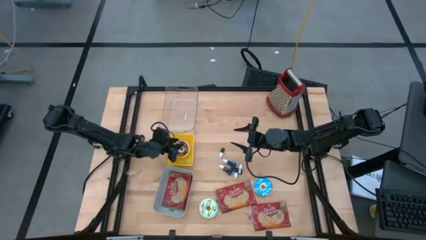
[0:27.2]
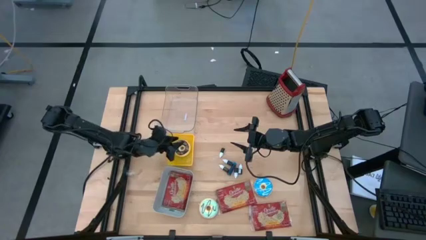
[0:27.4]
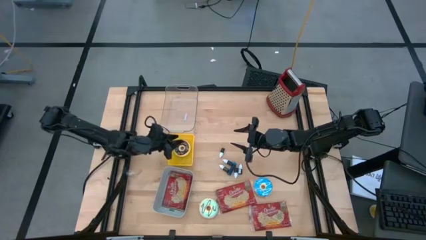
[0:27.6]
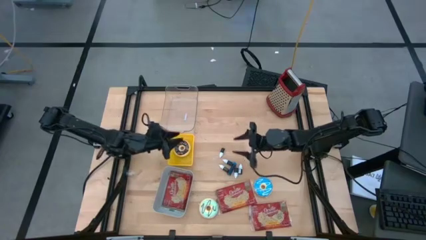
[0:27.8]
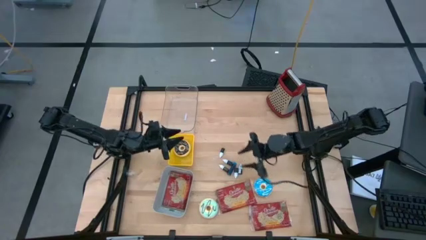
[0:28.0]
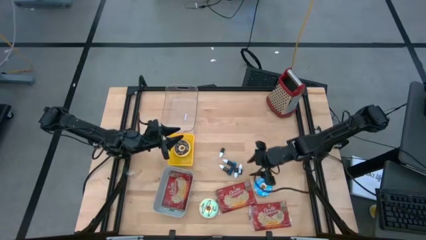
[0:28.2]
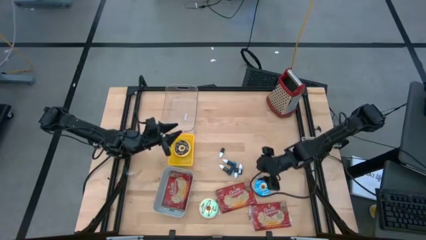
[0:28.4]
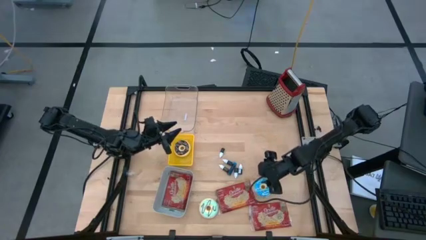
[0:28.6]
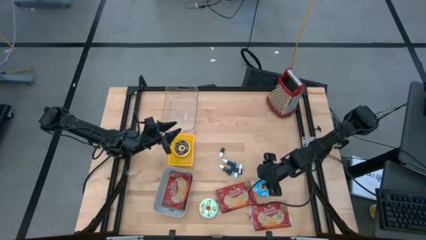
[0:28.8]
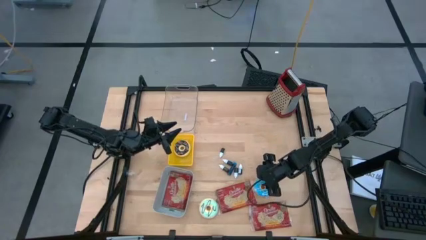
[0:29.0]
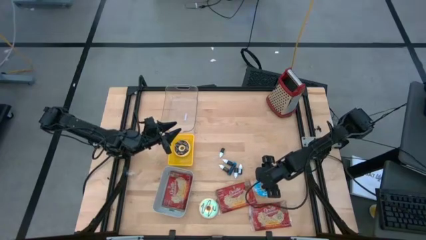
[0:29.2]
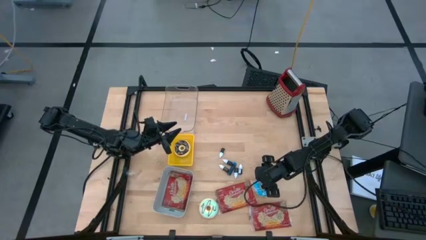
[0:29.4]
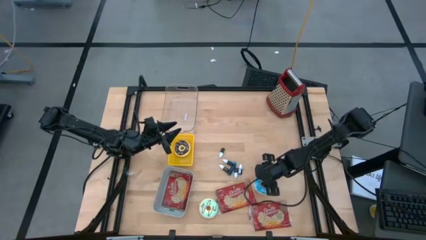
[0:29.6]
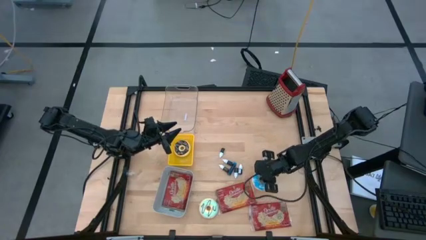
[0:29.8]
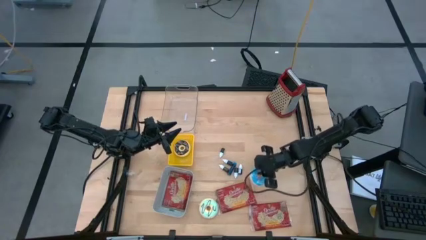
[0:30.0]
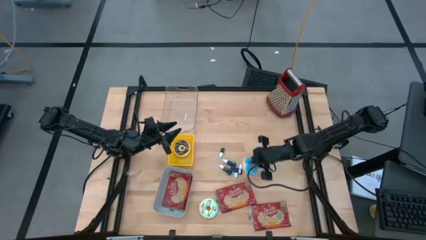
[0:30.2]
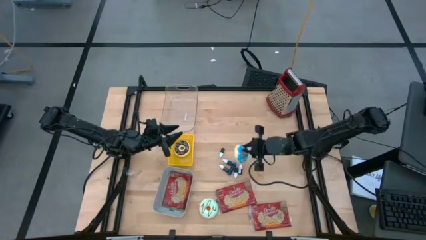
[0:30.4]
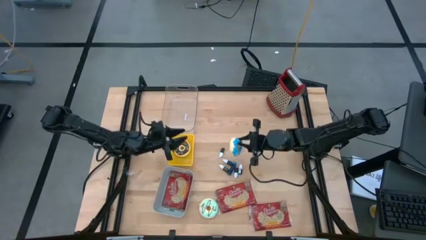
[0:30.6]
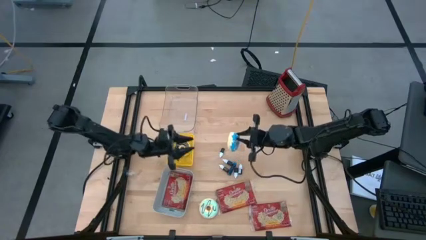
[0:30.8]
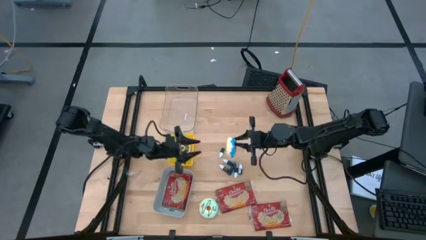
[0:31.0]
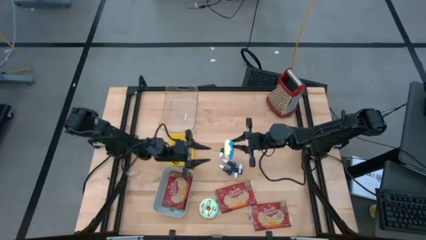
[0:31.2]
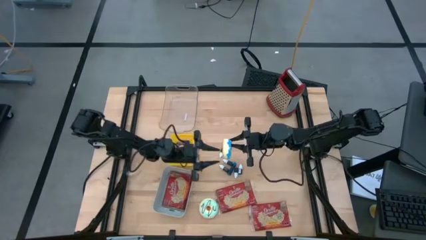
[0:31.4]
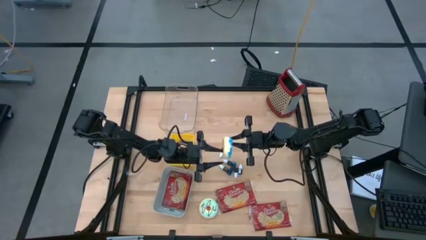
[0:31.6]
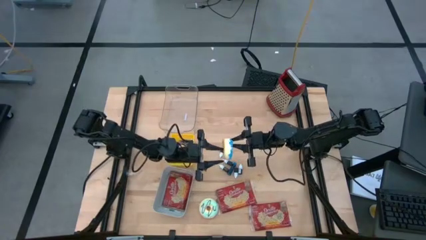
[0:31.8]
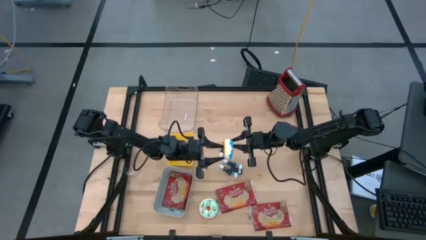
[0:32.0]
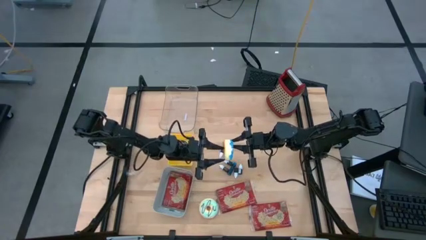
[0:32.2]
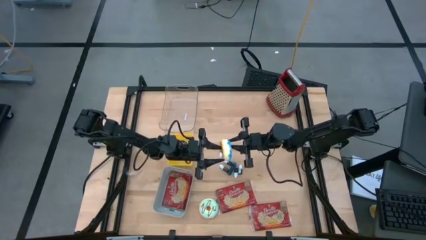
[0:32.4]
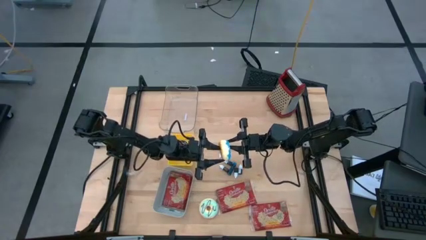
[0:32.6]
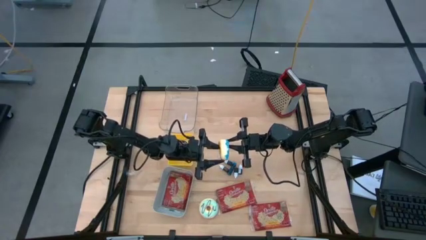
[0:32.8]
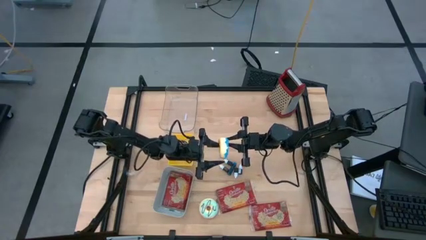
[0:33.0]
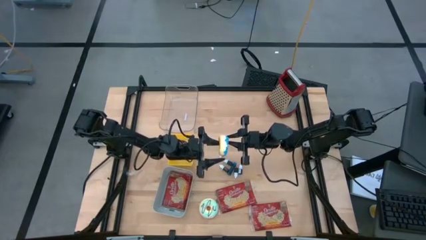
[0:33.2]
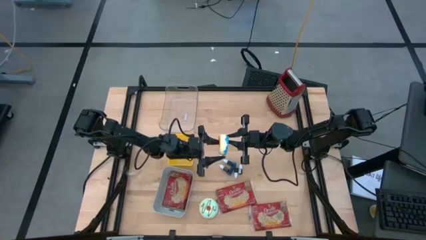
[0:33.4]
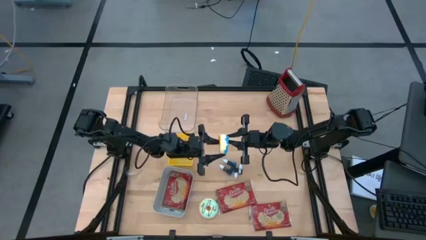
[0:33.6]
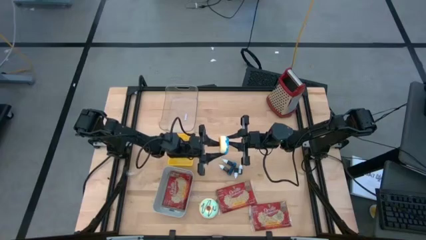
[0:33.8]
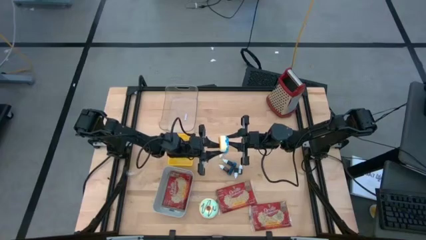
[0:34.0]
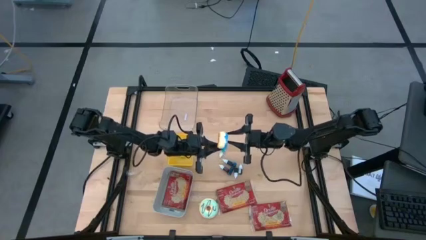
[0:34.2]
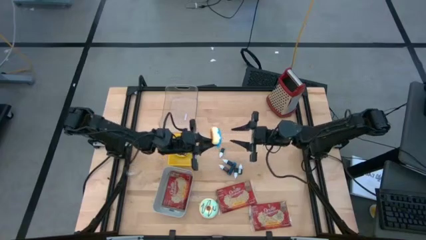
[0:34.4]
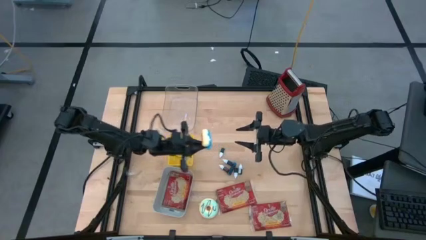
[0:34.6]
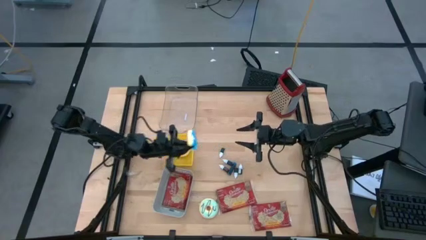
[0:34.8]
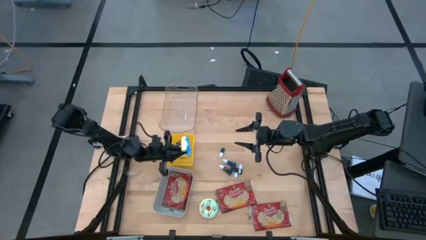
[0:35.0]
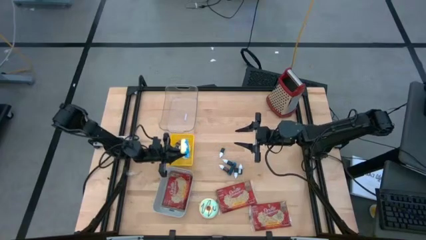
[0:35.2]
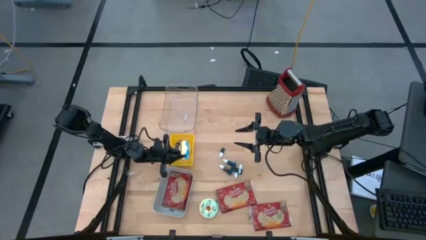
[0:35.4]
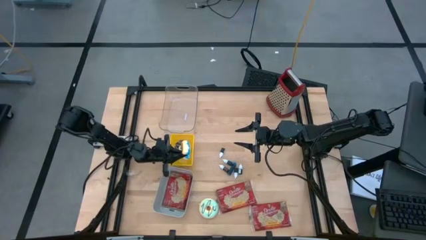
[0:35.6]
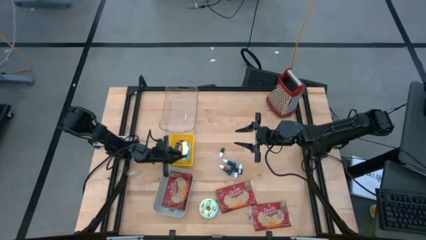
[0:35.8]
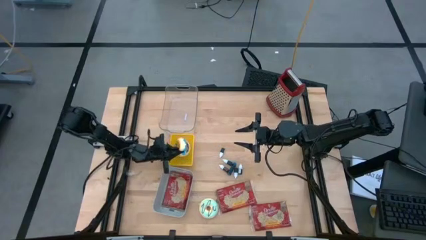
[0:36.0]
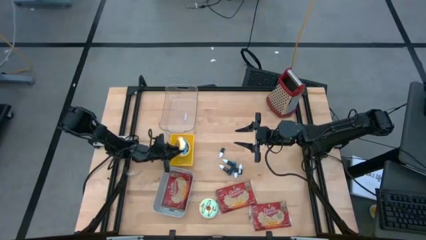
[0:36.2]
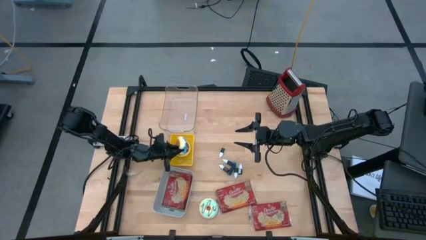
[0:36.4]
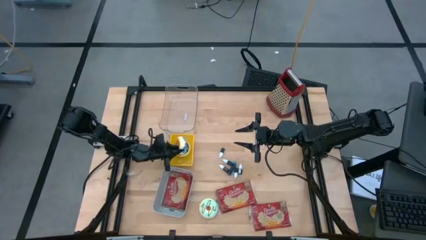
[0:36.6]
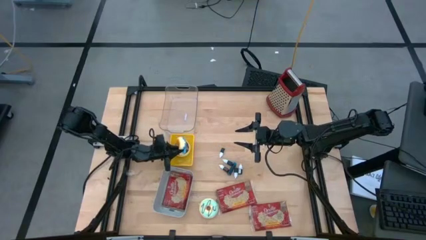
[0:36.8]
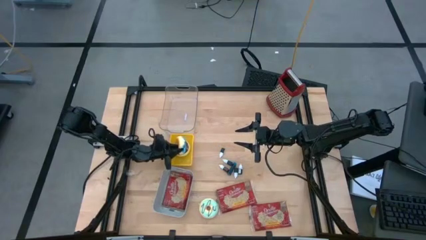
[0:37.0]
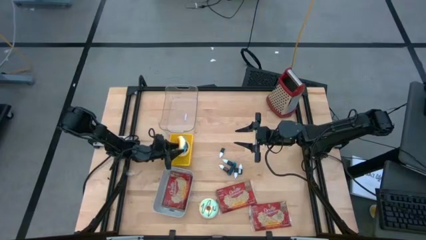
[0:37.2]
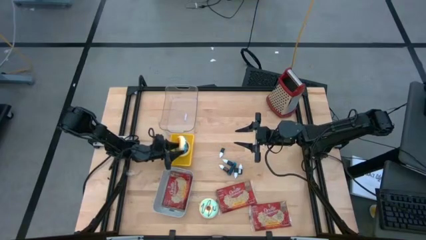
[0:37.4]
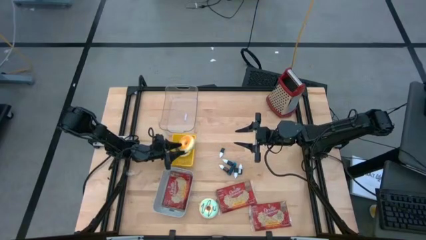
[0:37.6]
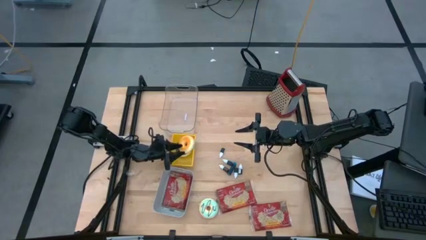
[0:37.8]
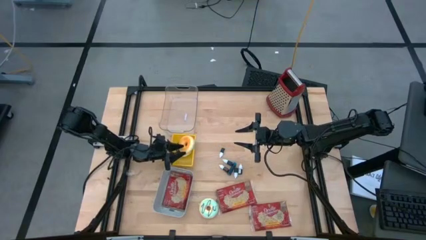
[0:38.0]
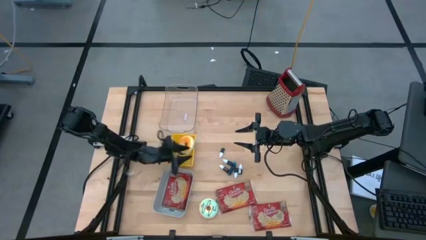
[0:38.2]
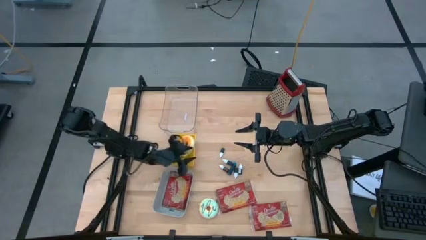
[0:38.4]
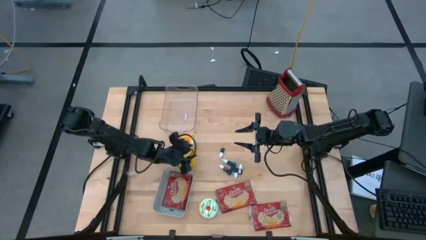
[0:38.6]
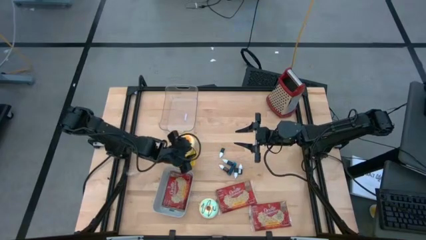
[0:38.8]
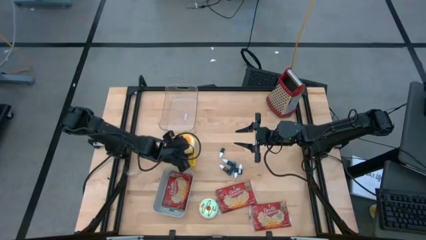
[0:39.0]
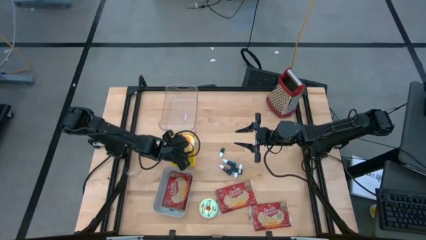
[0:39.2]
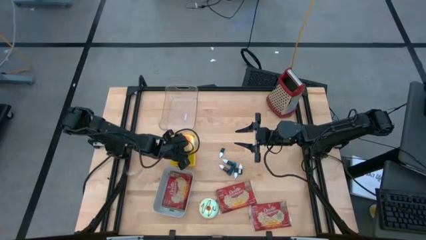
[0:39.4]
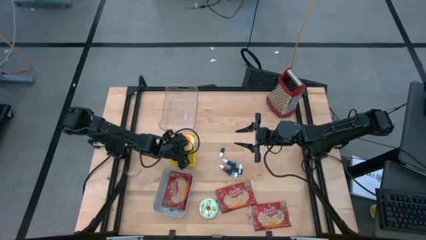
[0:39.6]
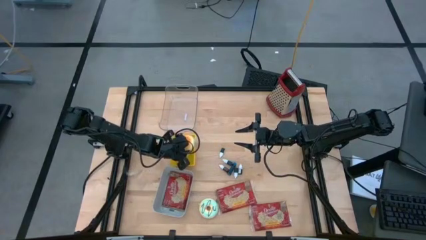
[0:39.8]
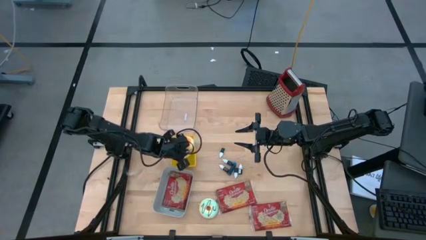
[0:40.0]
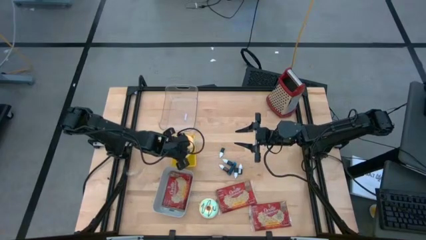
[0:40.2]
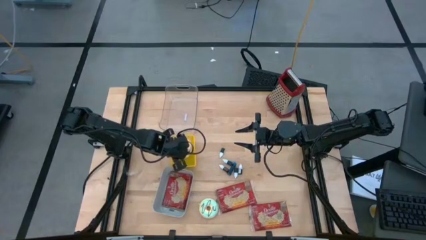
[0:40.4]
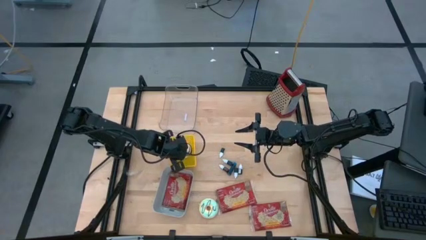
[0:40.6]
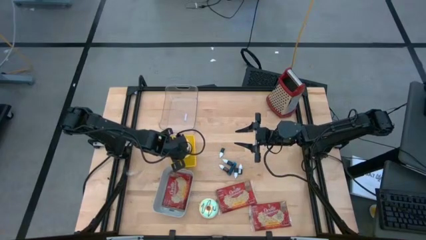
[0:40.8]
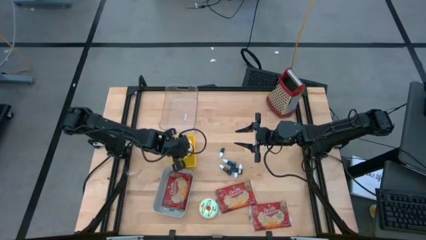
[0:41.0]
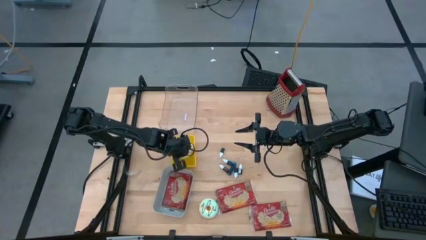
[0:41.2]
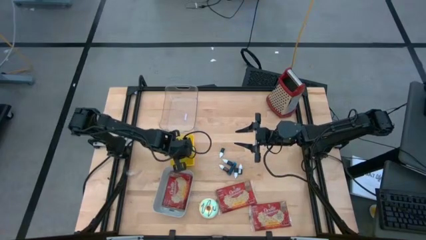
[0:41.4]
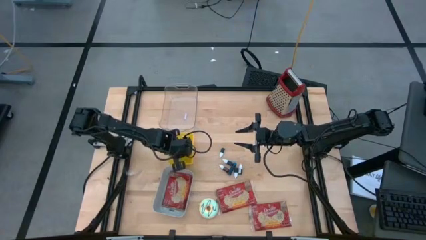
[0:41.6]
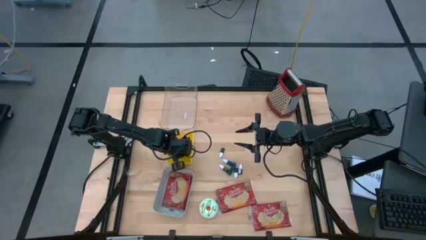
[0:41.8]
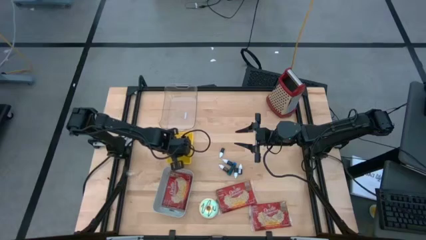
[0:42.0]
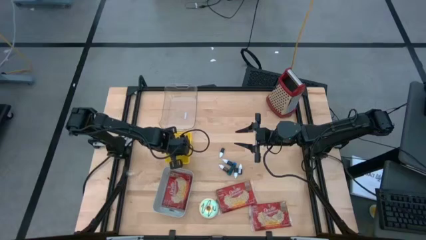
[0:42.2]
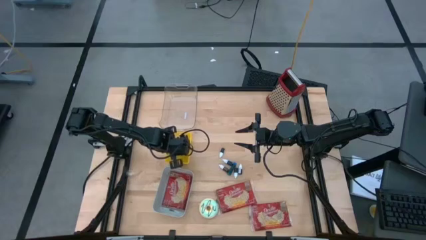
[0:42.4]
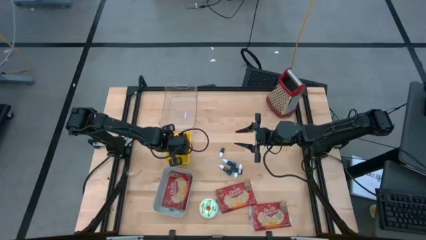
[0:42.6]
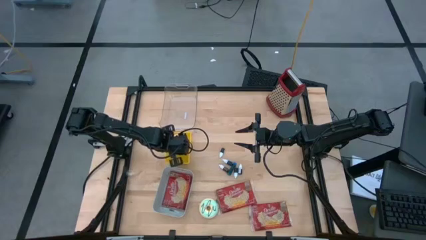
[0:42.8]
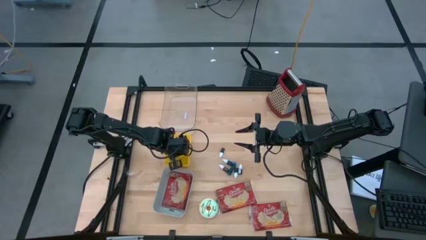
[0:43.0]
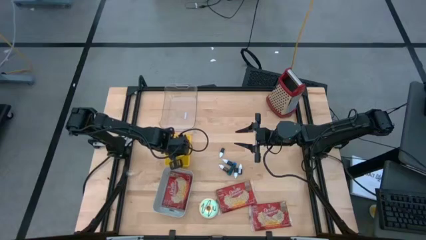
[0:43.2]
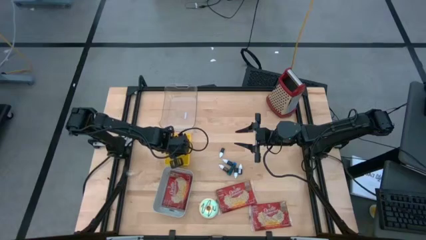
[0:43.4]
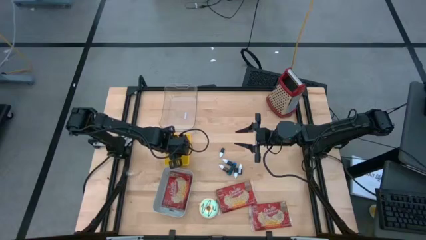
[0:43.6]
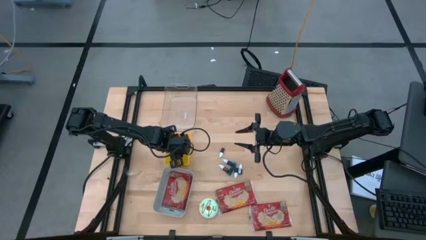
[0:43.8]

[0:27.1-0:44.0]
Task: Pick & Place Food Item
Put the blue doughnut into the yellow bin
